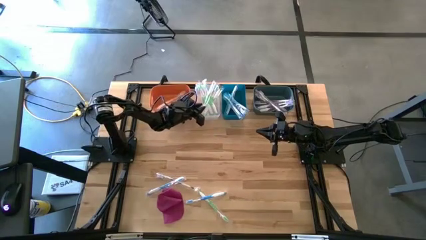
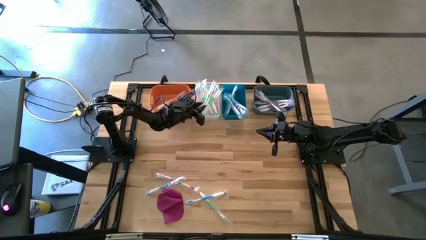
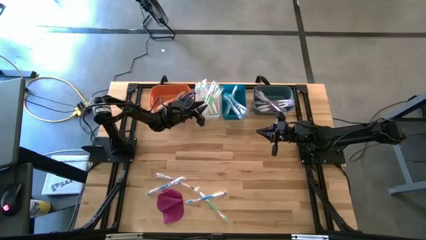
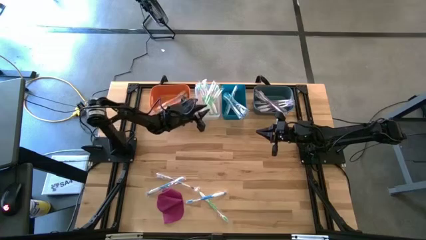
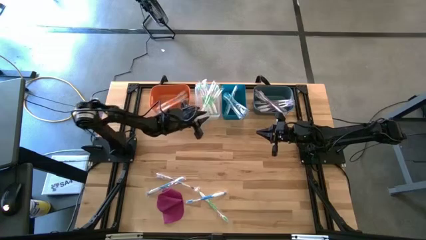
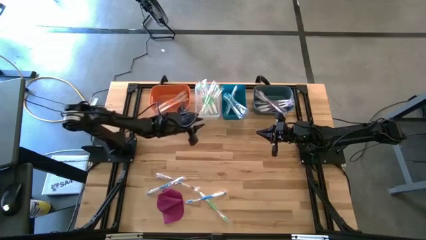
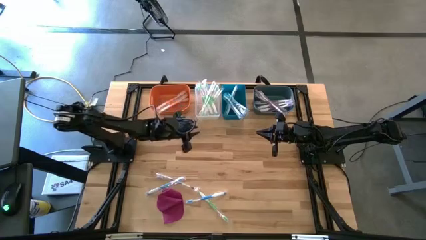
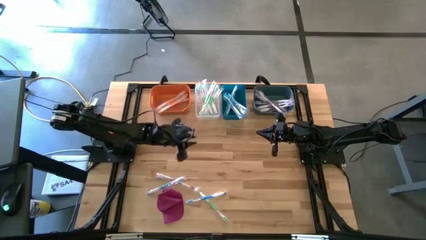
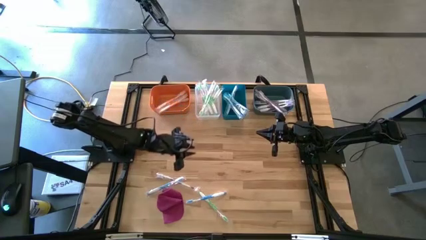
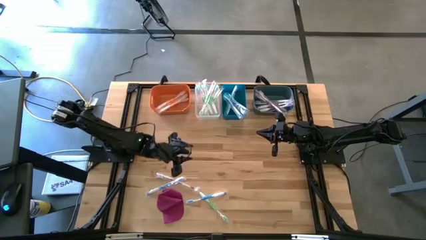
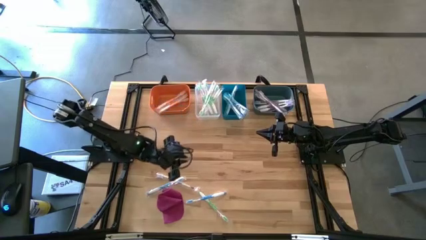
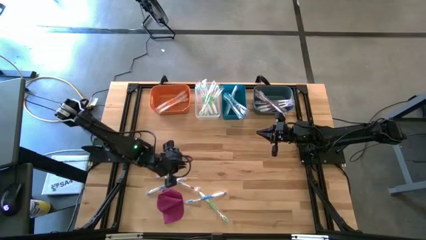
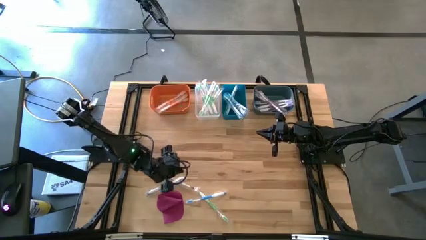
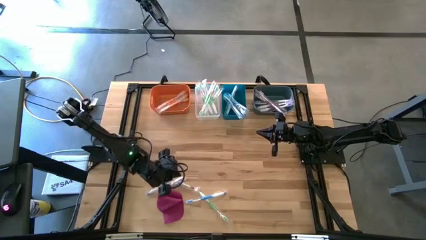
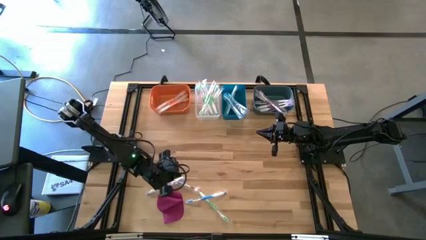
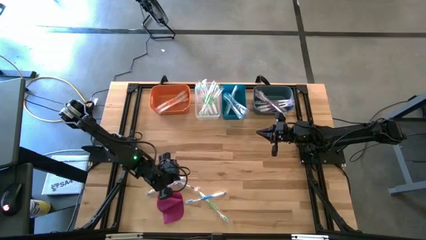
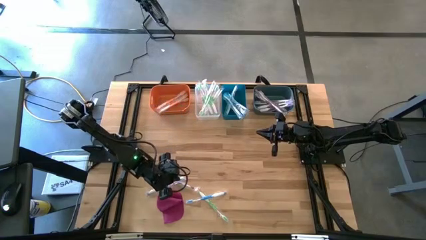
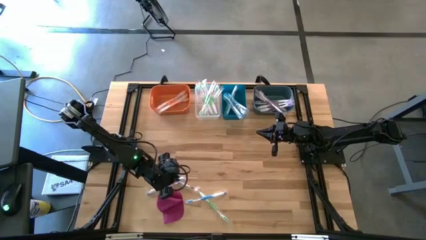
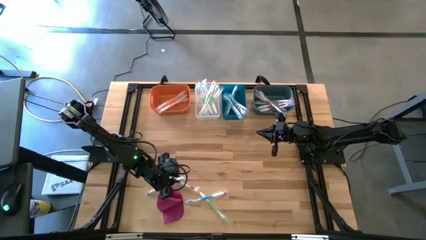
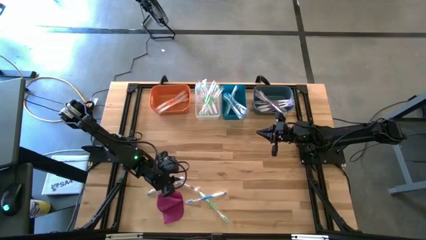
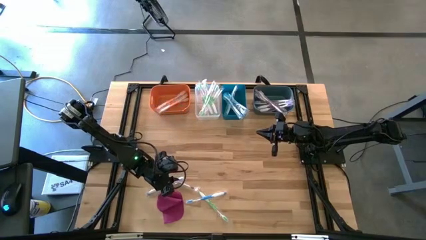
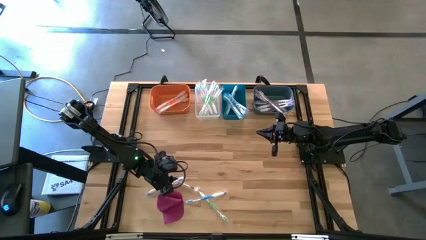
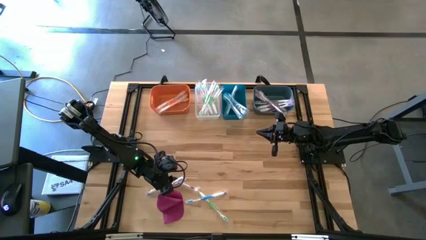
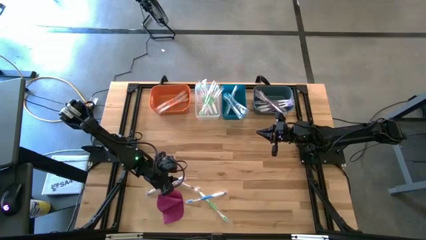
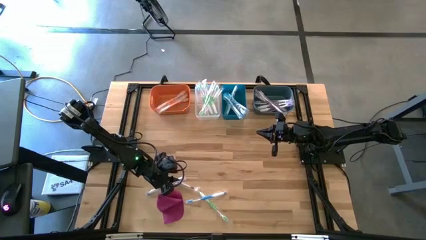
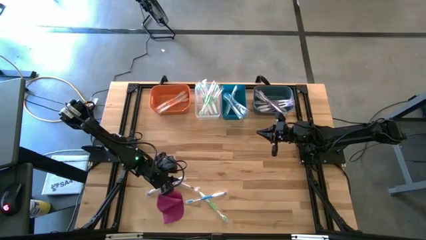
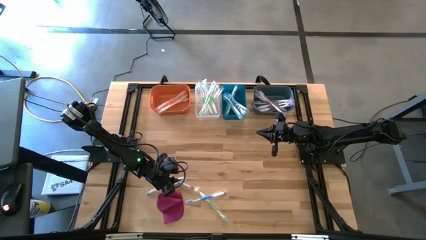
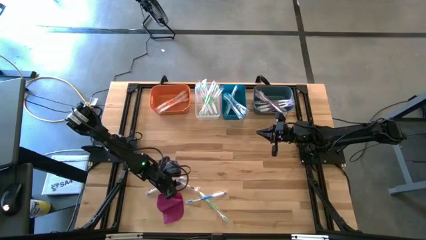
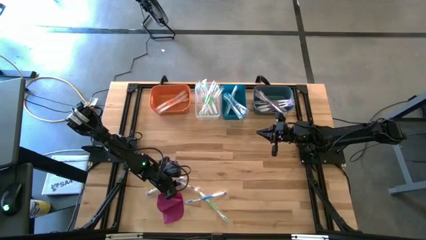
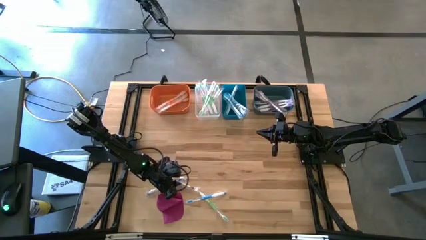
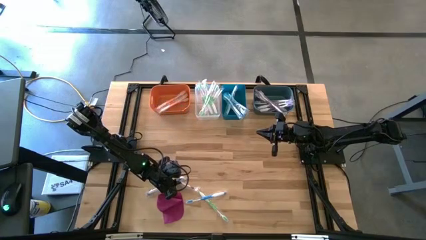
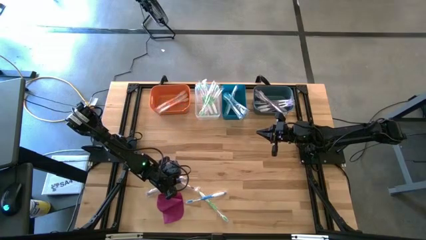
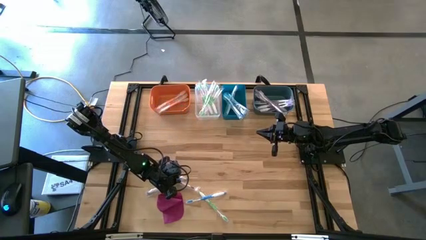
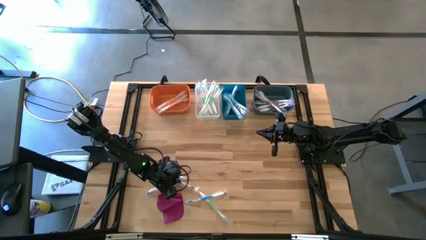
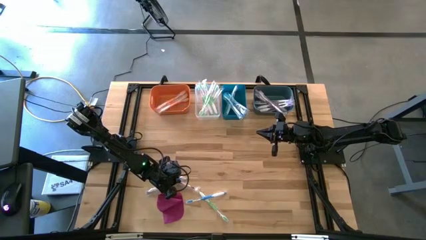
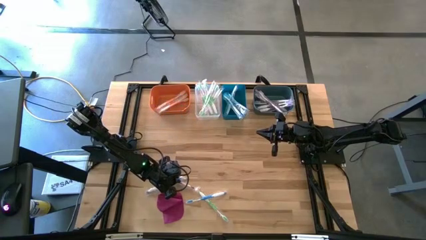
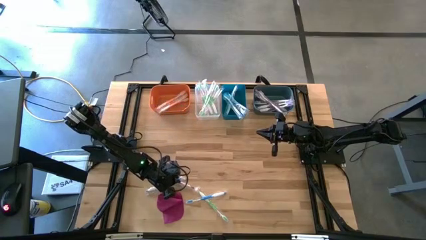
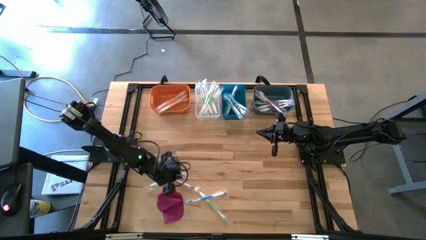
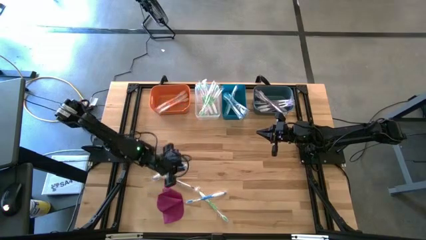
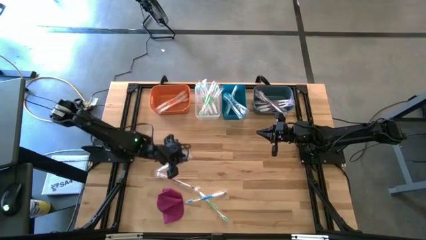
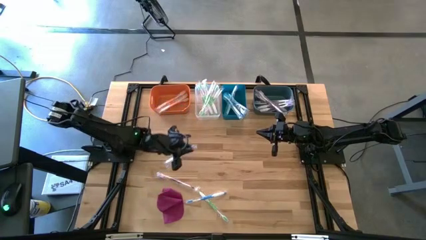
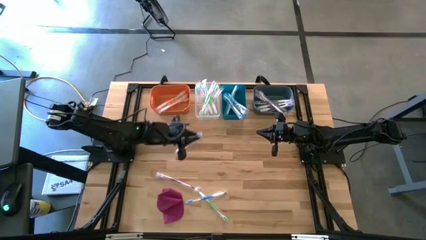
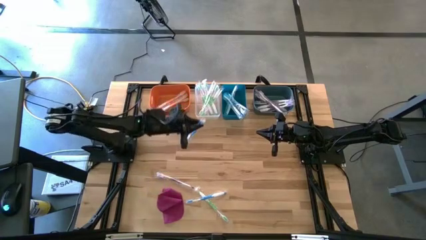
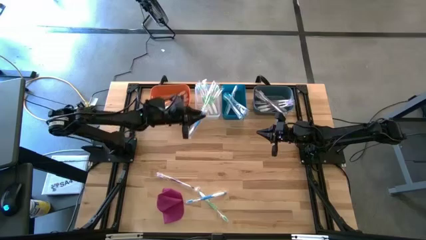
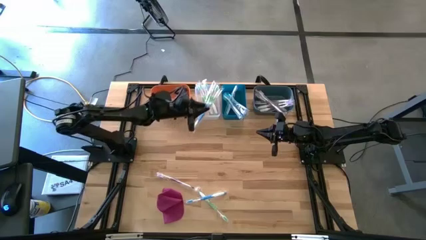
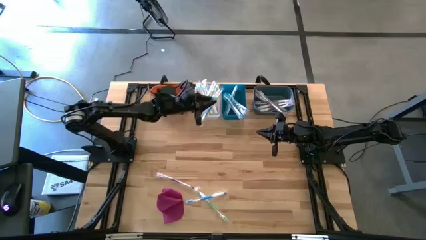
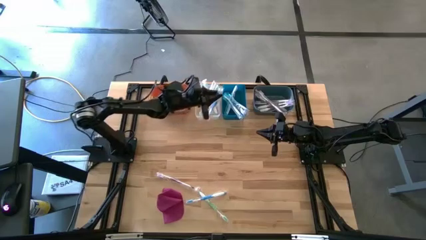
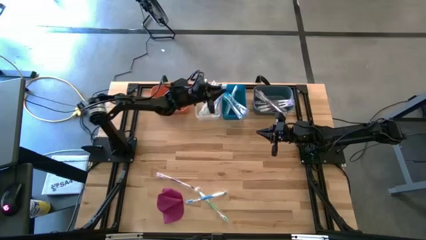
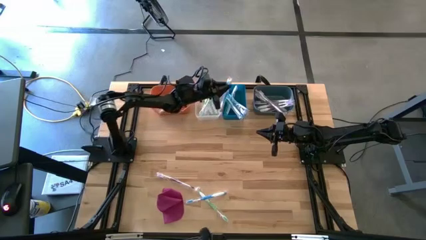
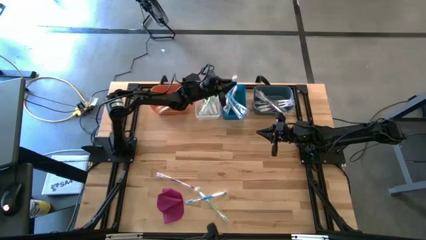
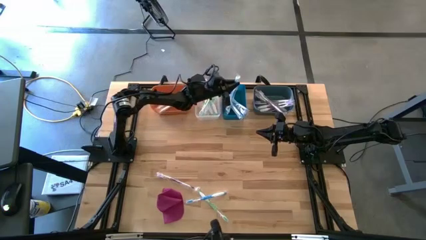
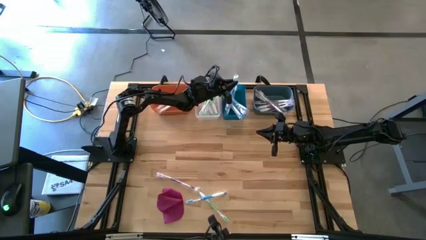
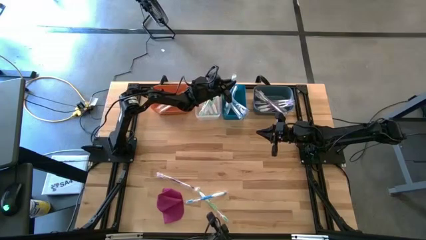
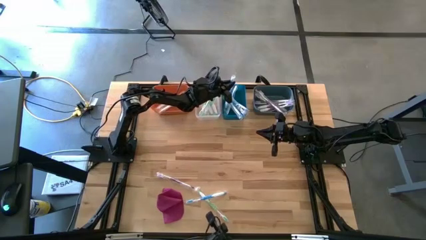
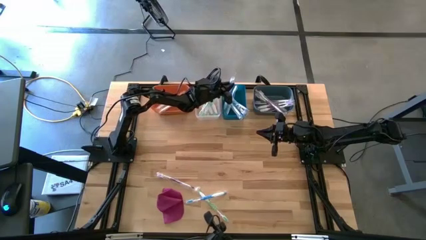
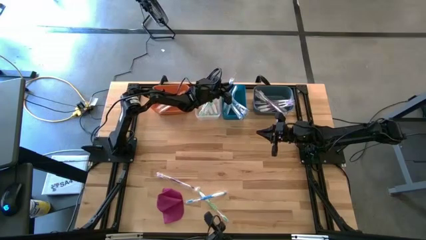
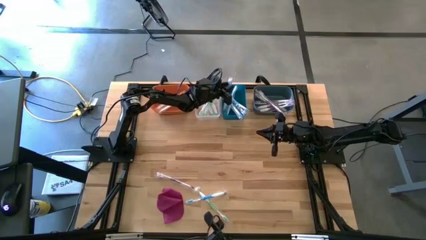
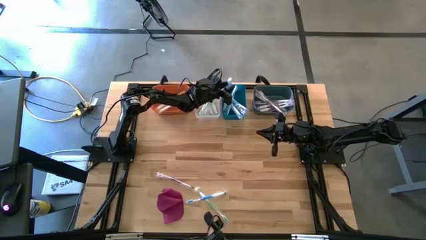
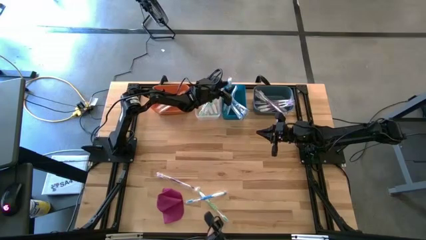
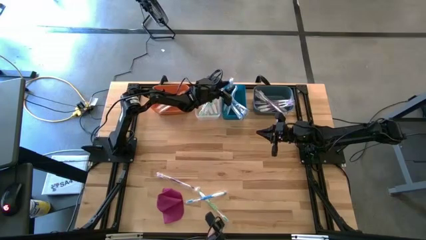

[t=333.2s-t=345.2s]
Task: Pick & Place Toothbrushes
Put the blue toothbrush into the blue bin
